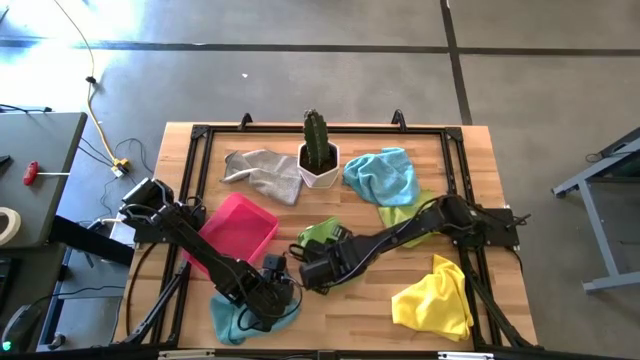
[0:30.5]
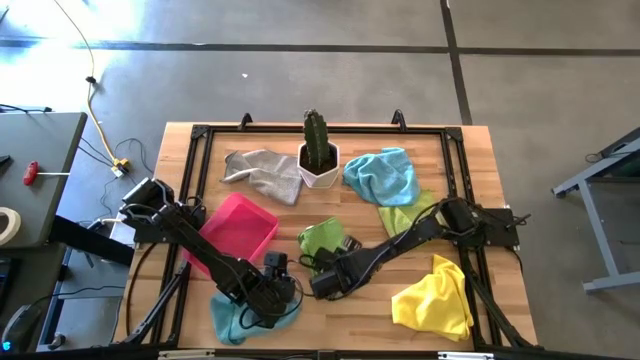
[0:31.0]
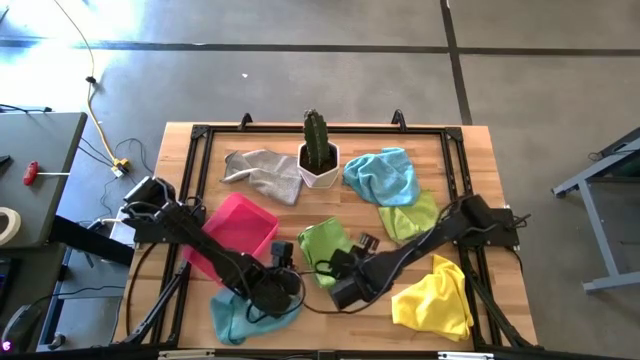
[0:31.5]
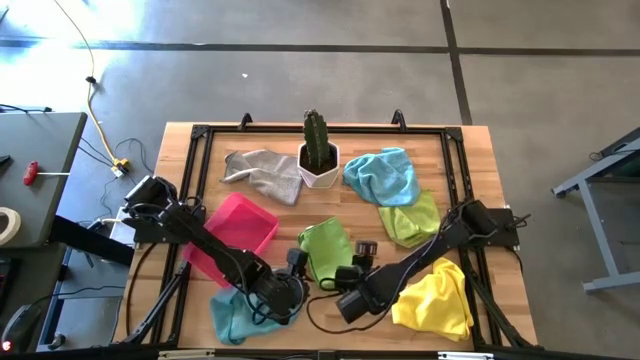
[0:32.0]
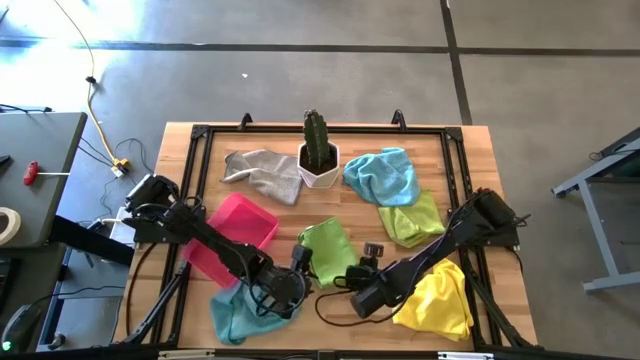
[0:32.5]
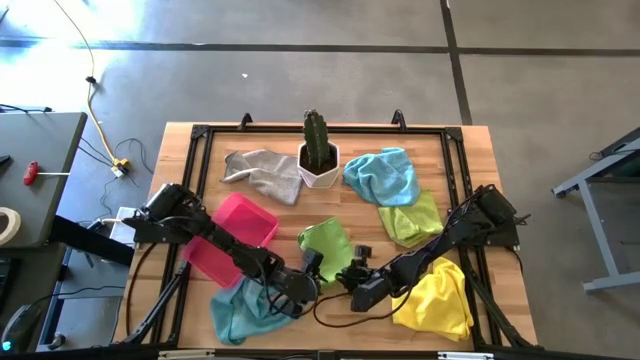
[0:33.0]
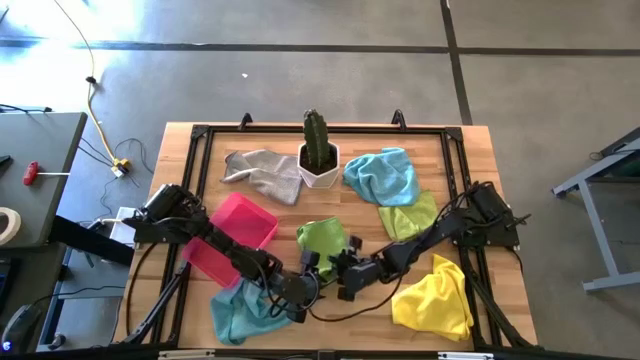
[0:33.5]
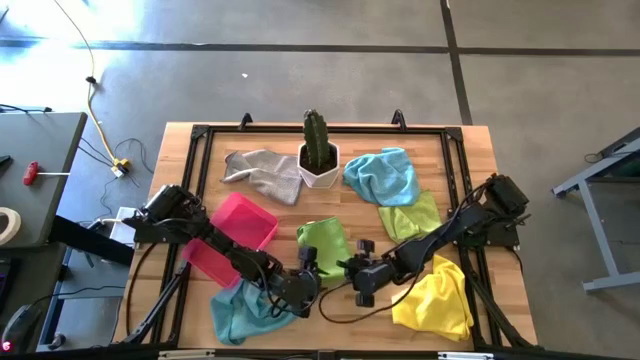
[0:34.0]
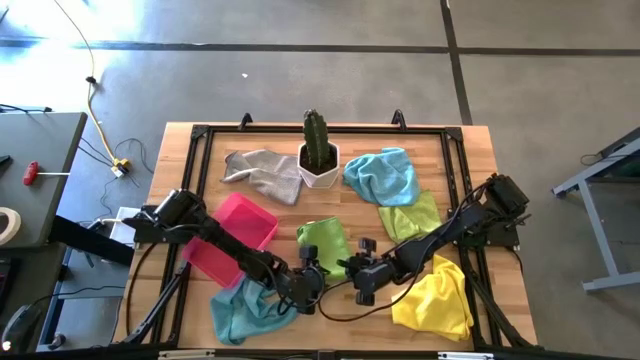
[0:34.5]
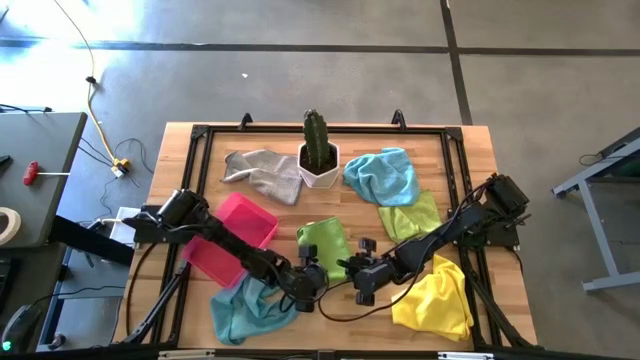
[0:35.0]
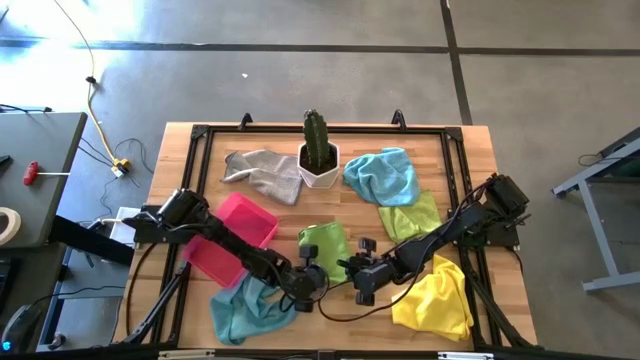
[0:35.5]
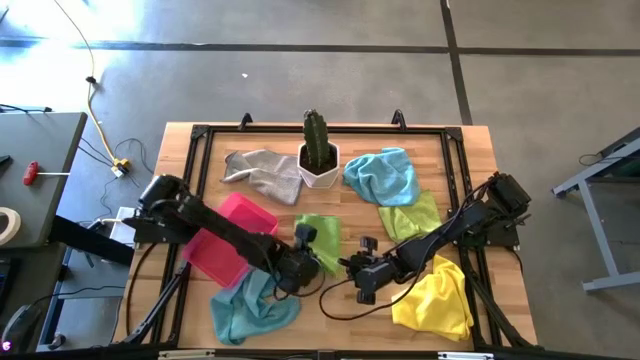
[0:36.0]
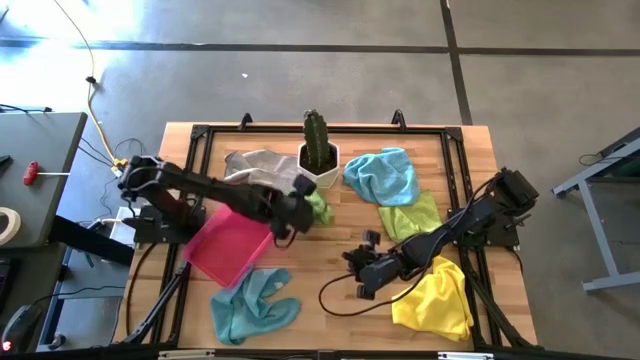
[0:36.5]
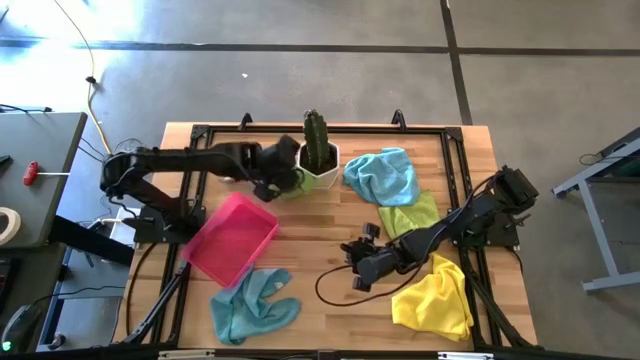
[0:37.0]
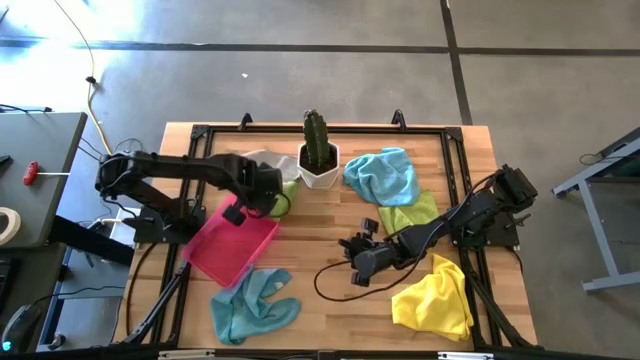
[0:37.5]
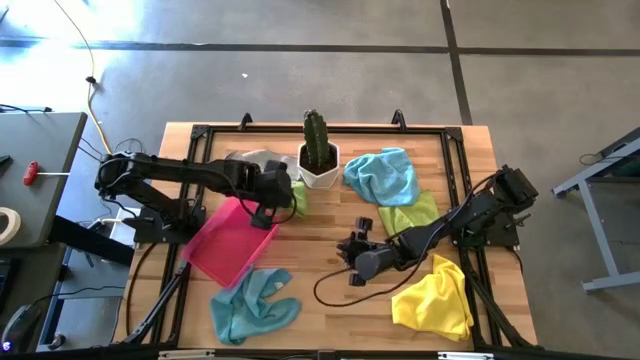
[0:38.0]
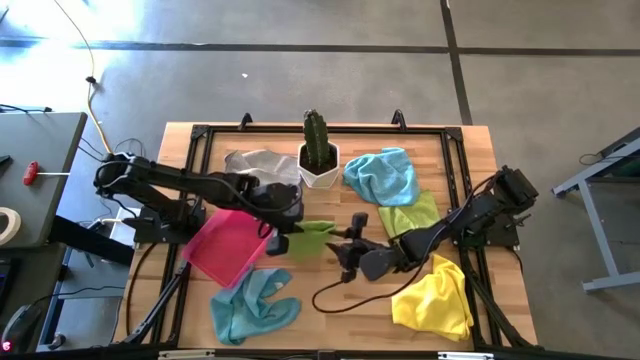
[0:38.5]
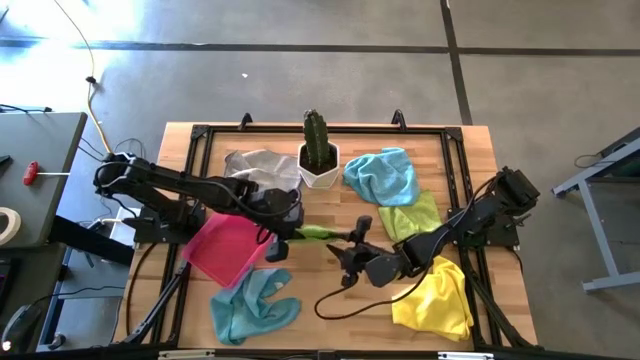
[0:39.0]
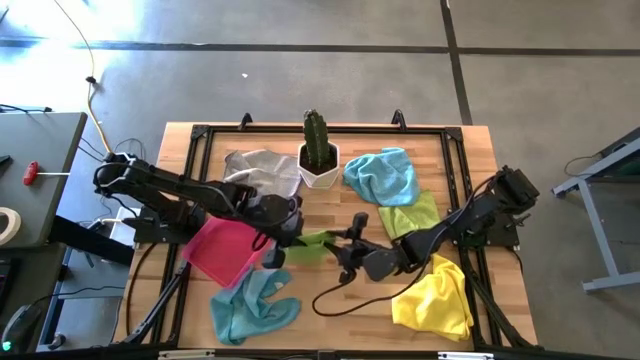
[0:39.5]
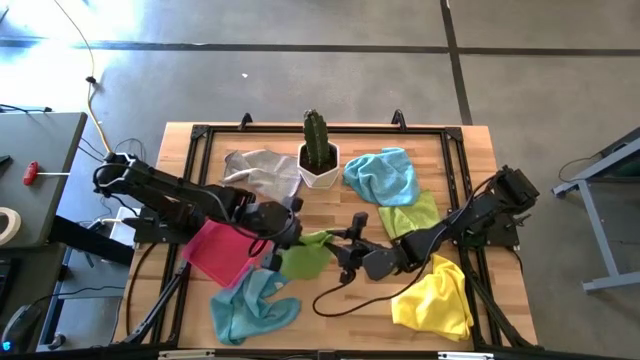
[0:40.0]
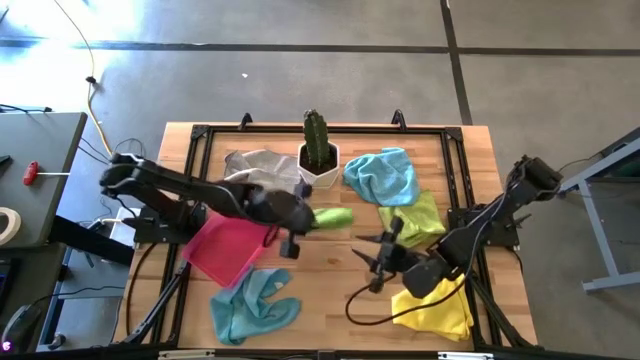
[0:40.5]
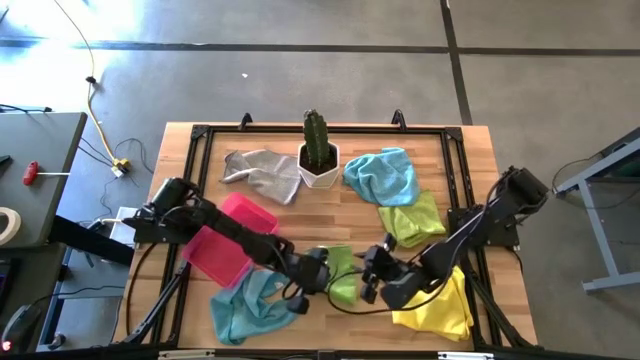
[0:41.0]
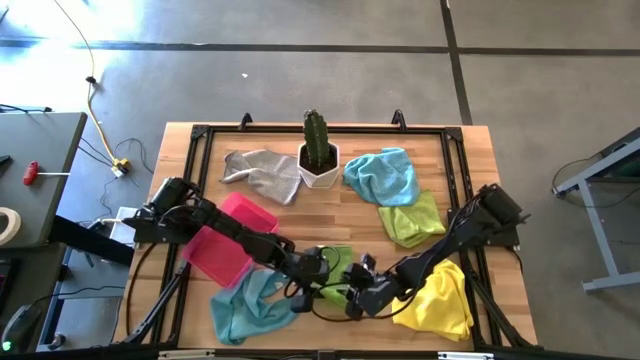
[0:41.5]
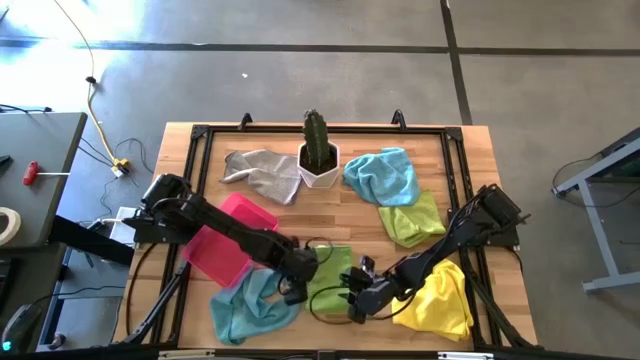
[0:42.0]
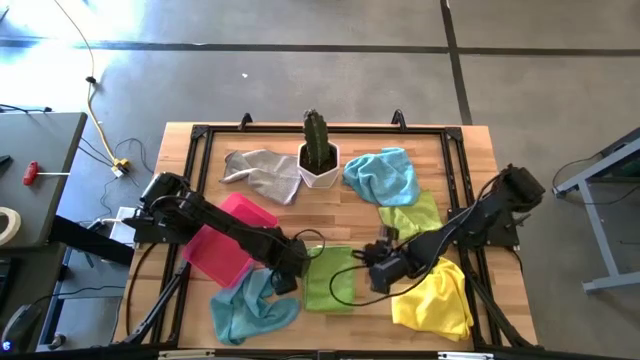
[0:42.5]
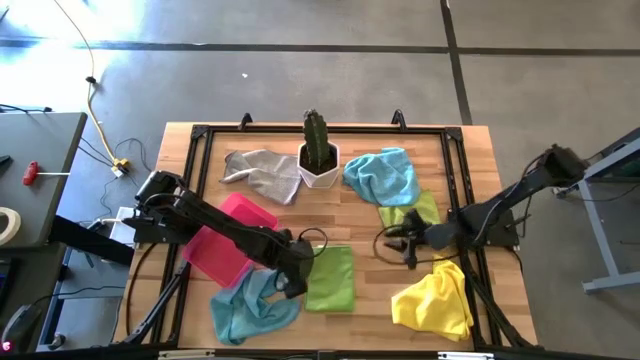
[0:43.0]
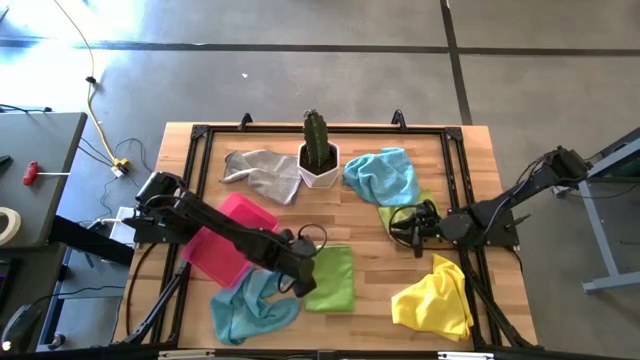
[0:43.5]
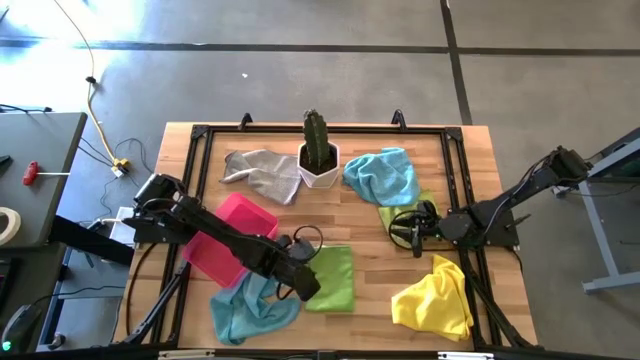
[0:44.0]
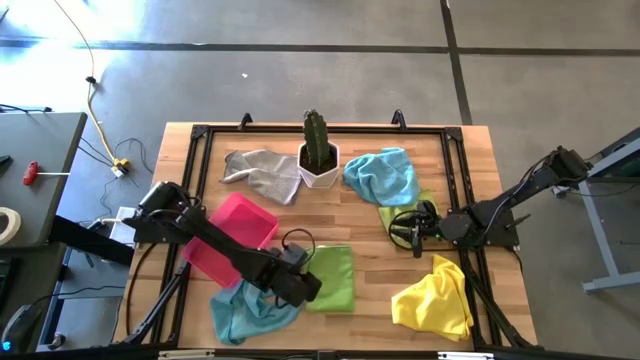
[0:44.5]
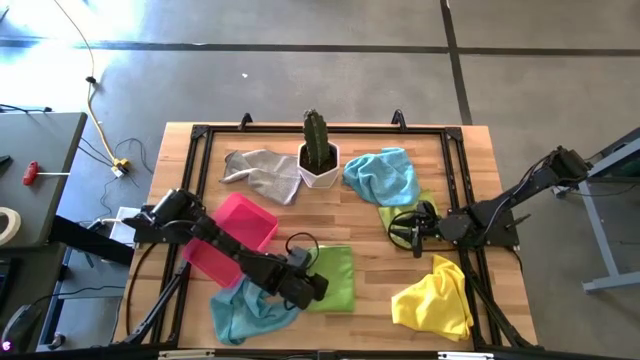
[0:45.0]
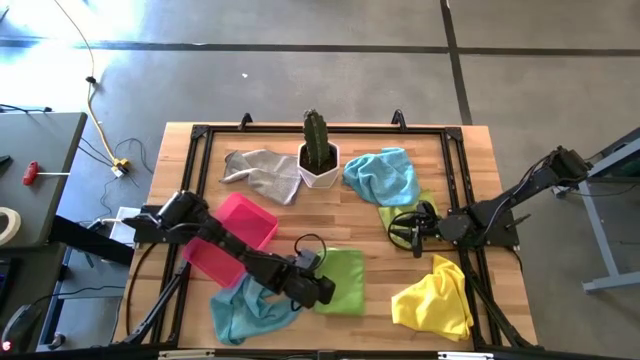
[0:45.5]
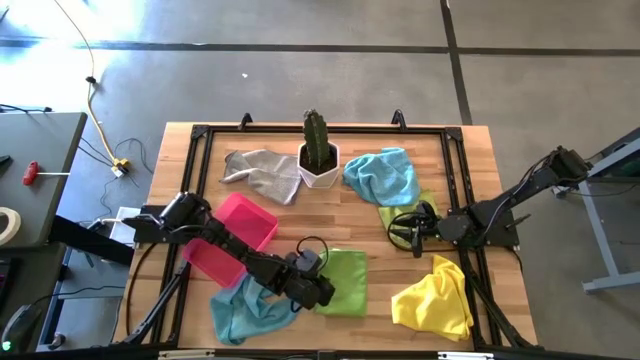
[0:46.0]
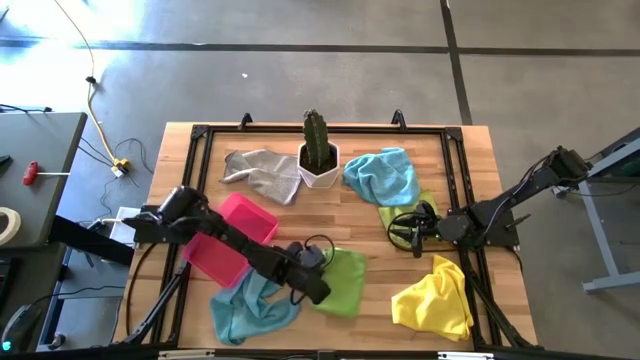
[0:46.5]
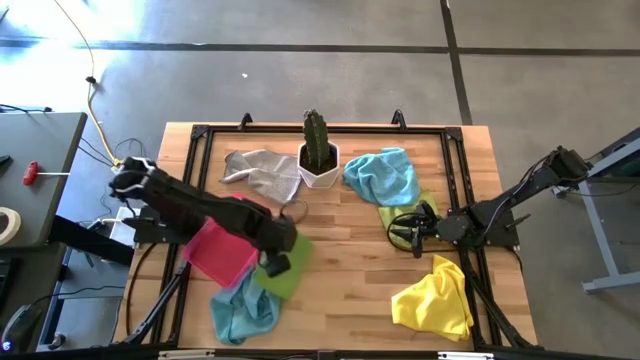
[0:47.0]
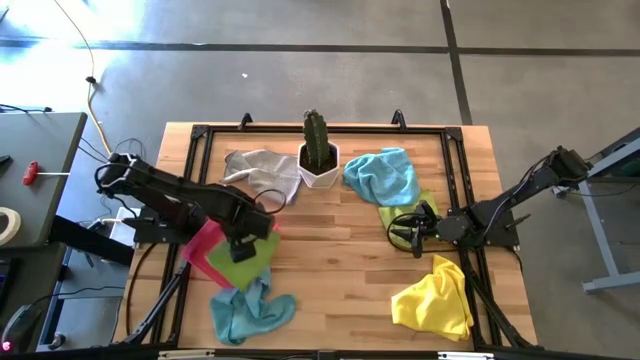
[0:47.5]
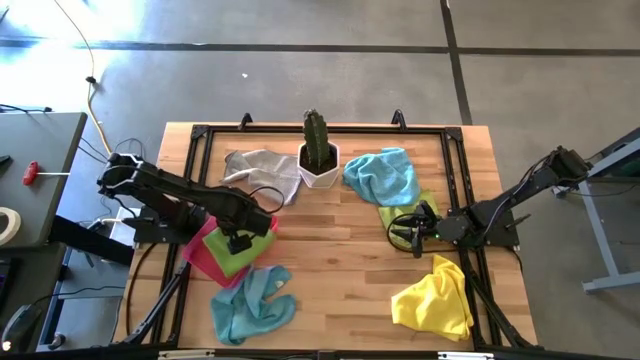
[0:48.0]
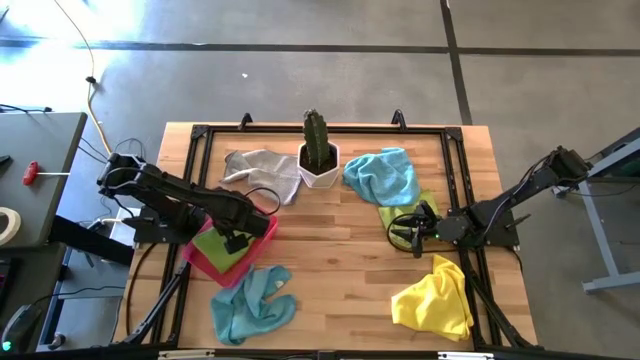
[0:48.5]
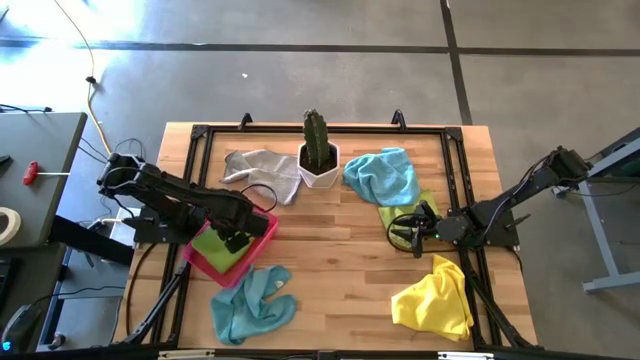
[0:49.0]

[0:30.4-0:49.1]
Task: Fold microfiber towels
Put the green towel in the pink bin

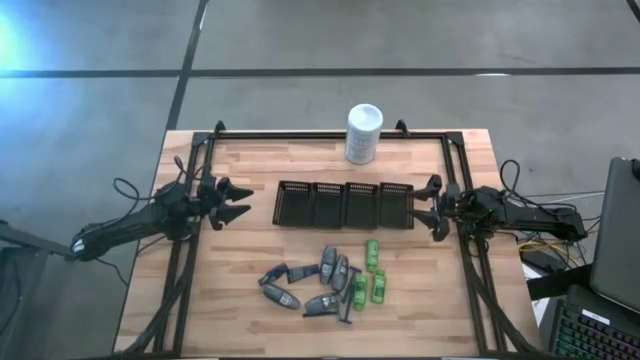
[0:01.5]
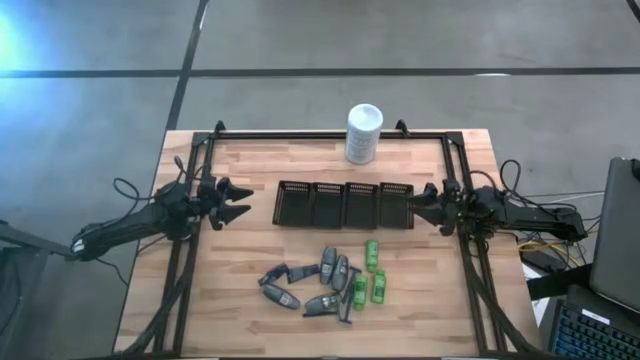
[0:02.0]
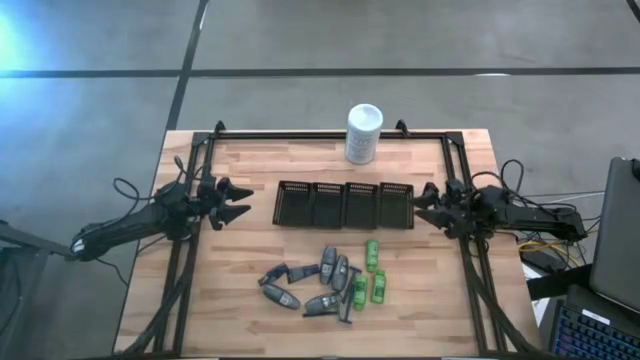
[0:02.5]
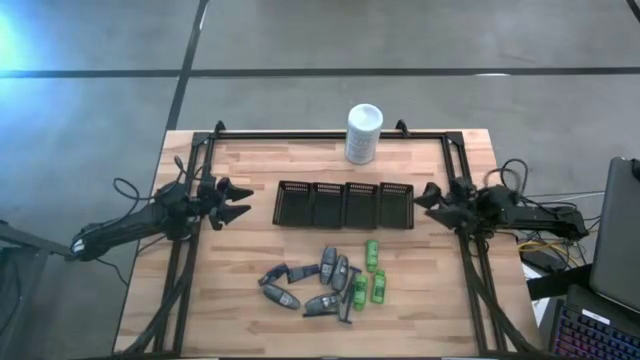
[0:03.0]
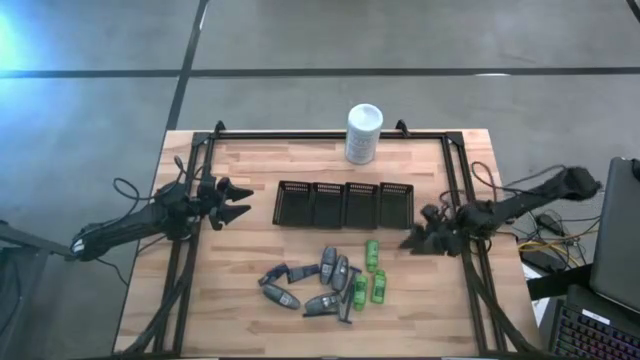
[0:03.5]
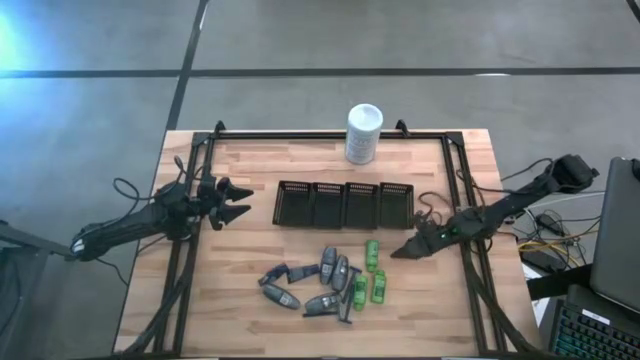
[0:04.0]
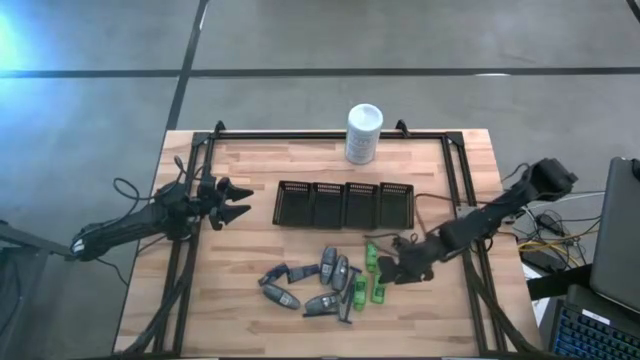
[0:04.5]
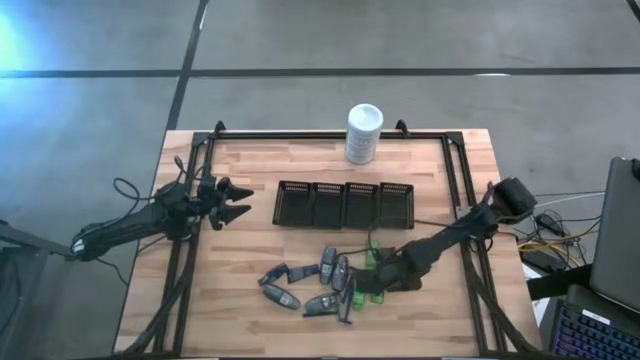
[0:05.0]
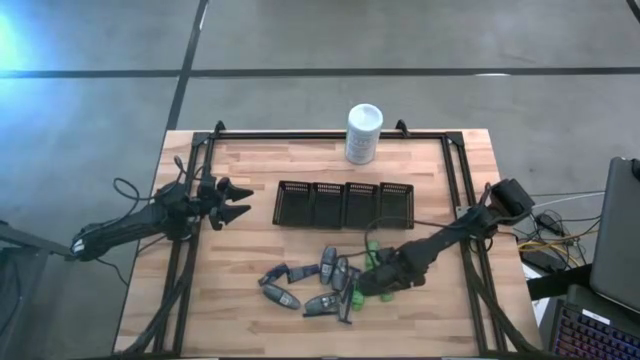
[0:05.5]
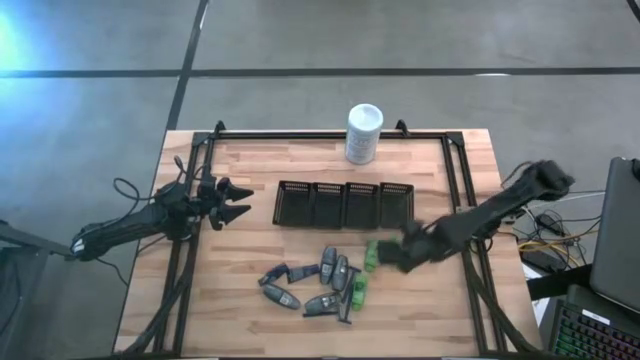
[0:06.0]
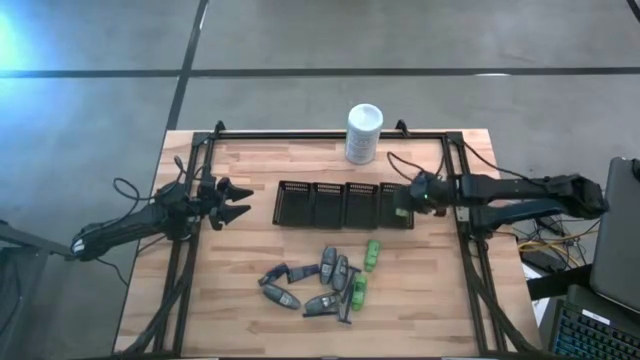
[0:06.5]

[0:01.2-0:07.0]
Task: Pick & Place Travel size toiletries
Put the green shampoo into the right black bin
